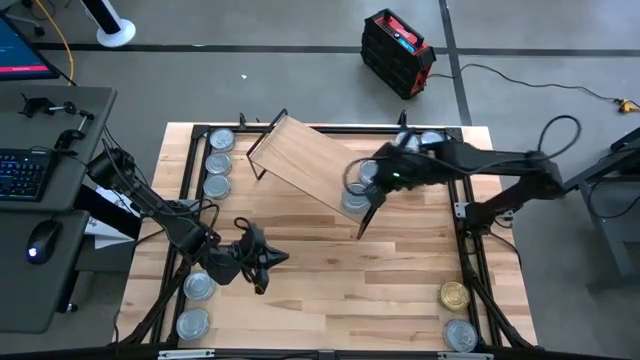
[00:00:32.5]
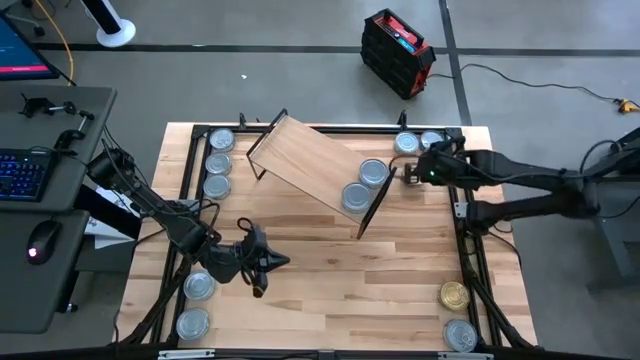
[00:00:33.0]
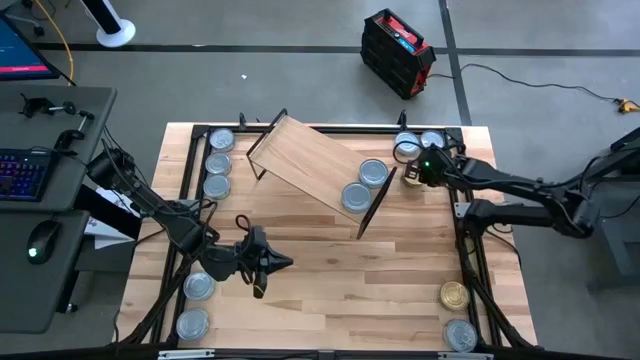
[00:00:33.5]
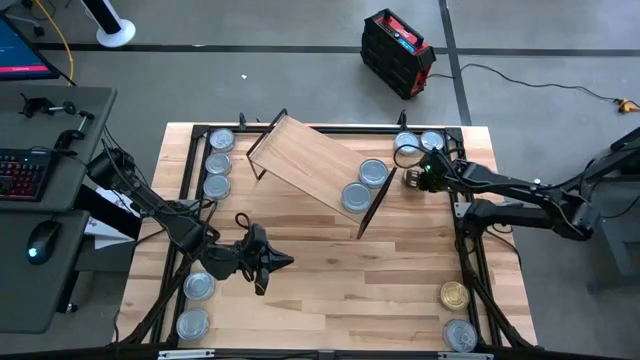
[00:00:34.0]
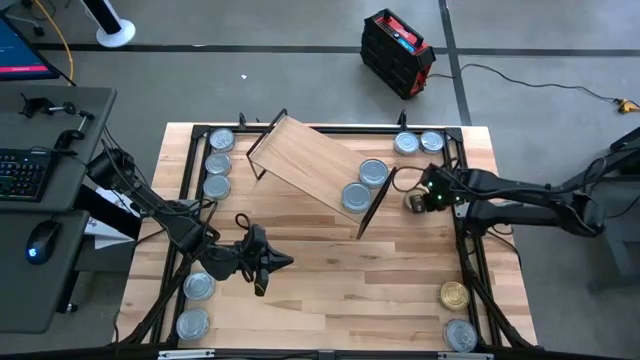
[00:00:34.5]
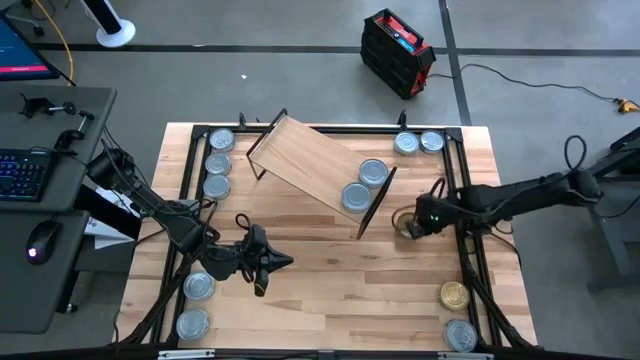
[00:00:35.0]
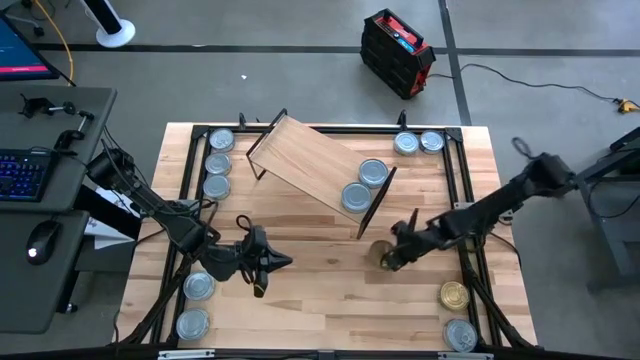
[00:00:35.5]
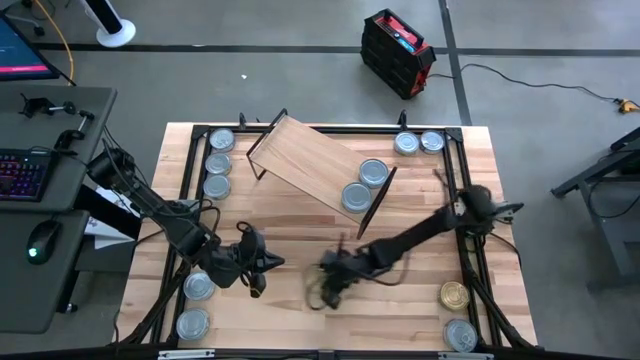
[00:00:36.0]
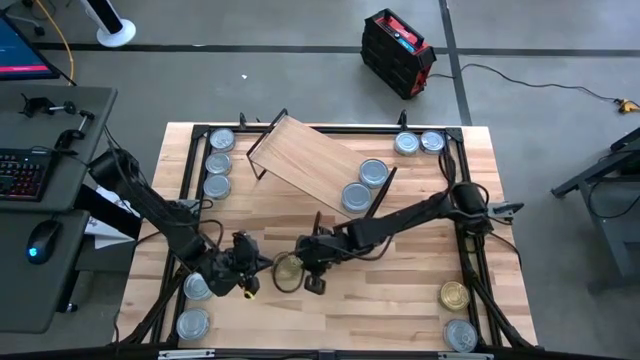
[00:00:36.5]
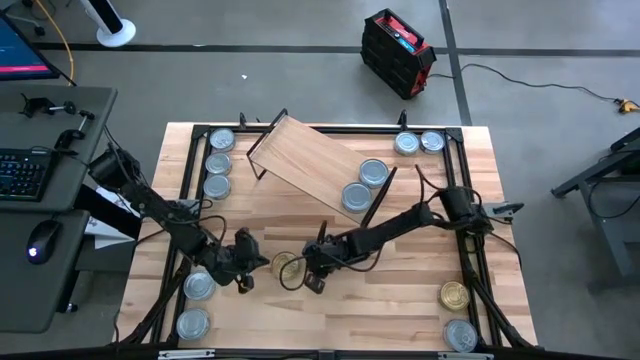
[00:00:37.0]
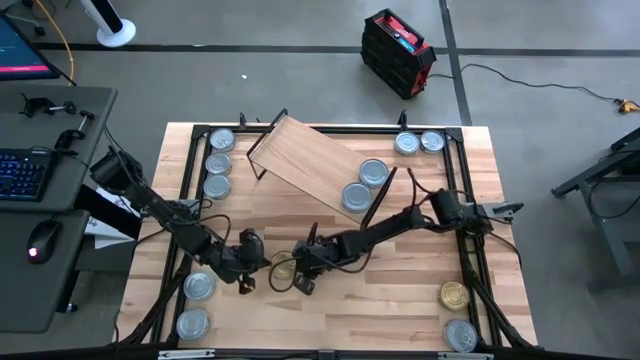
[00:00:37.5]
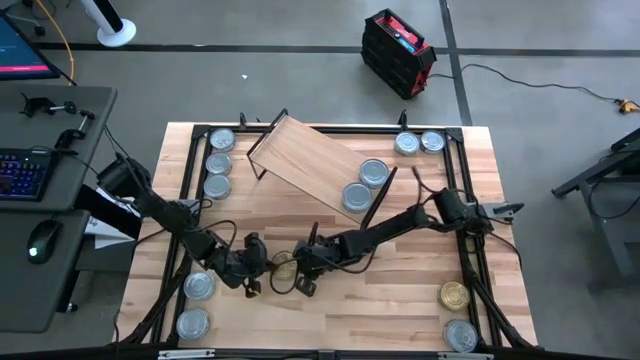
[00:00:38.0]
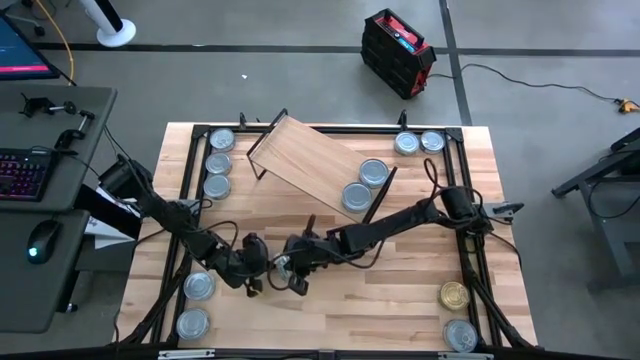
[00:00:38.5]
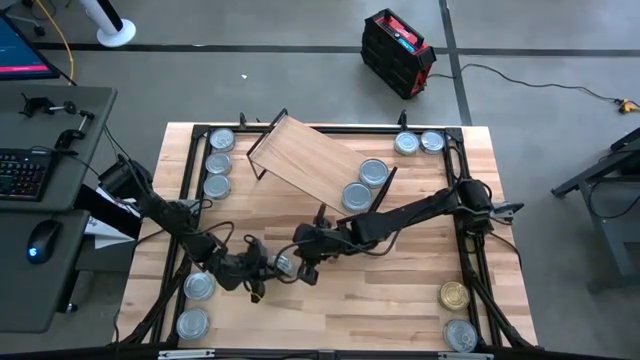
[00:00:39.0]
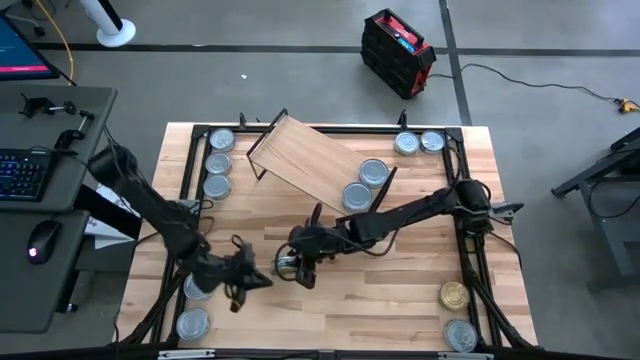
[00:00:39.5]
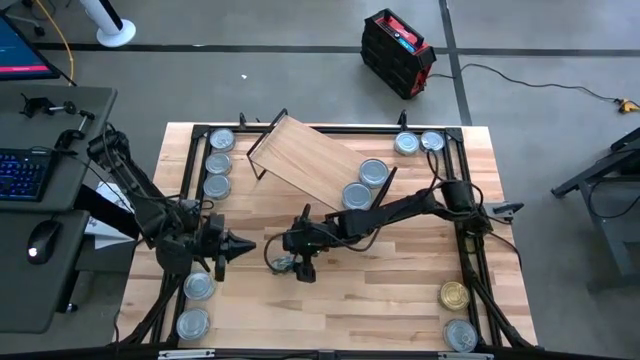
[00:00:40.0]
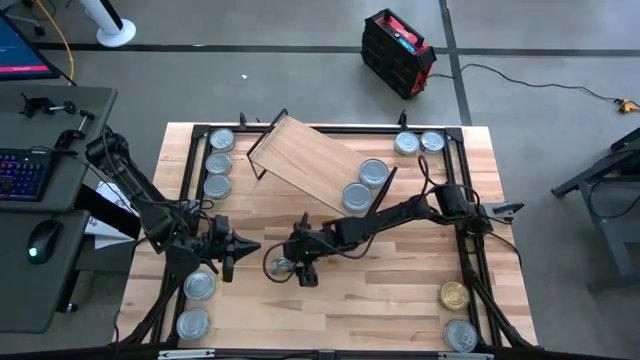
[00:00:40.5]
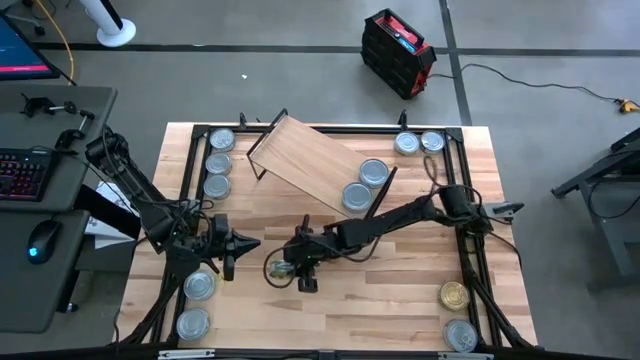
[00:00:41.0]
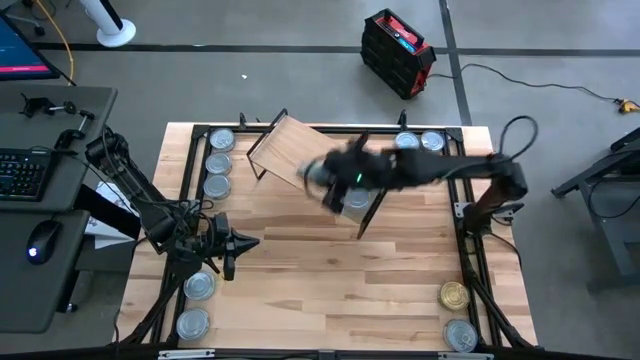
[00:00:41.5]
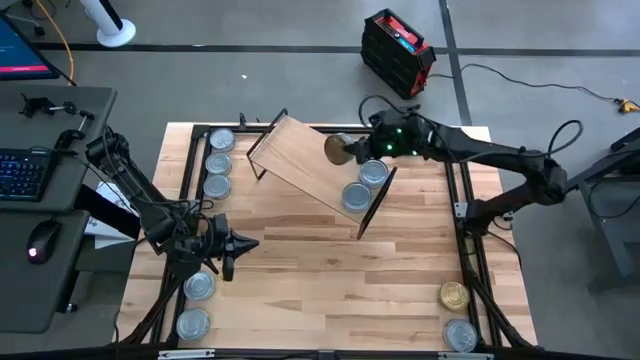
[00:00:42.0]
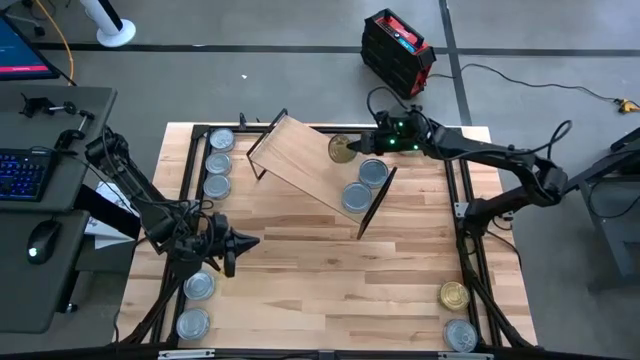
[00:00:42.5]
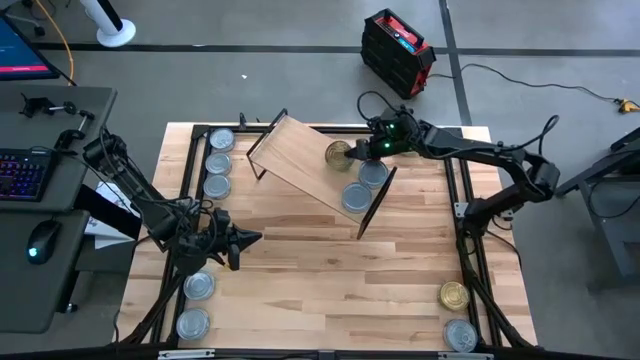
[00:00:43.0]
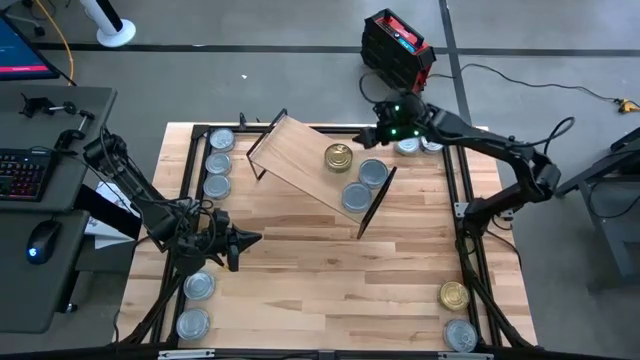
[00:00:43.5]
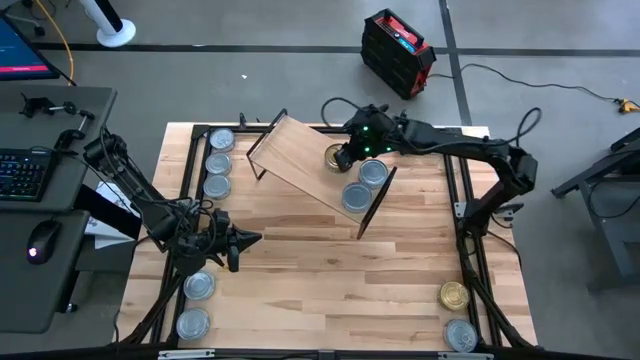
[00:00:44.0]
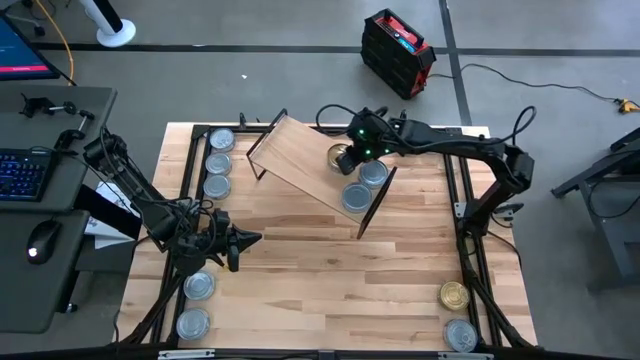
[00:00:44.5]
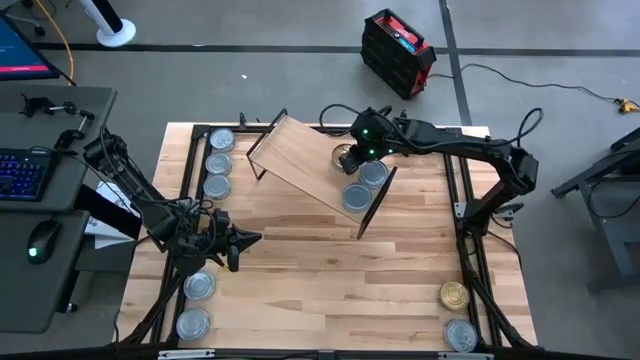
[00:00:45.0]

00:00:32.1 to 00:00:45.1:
Task: Stack canned seafood by type on shelf
Put the green tuna can on the shelf

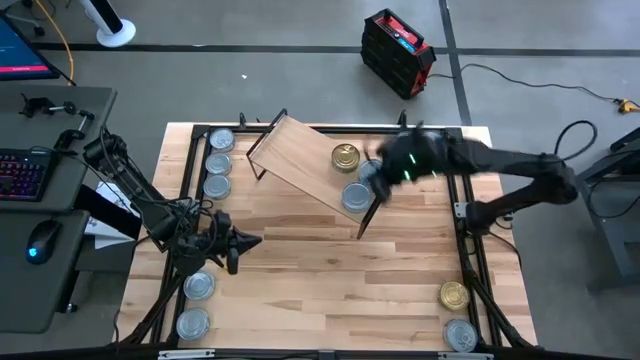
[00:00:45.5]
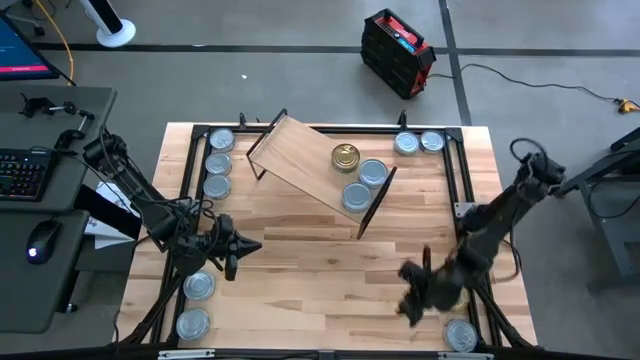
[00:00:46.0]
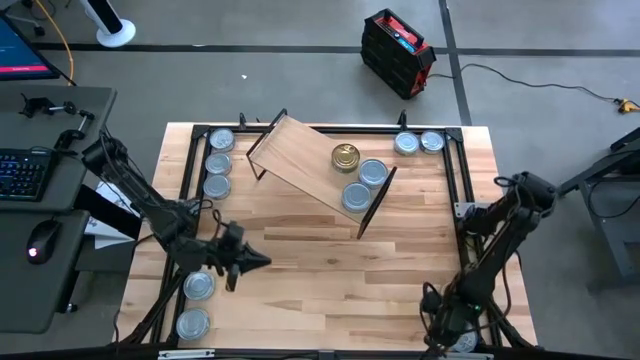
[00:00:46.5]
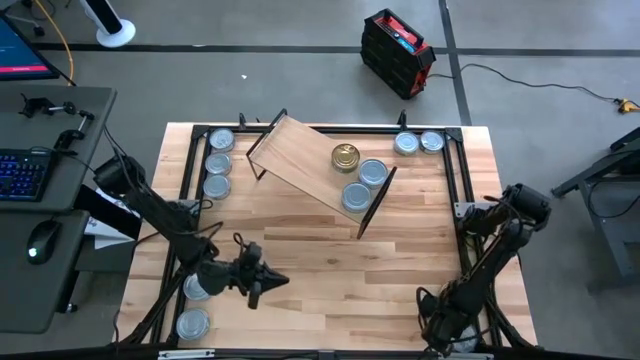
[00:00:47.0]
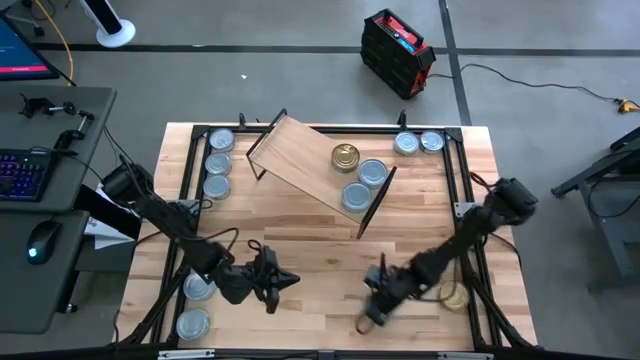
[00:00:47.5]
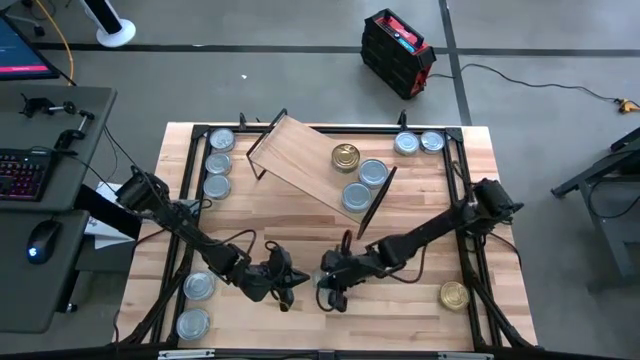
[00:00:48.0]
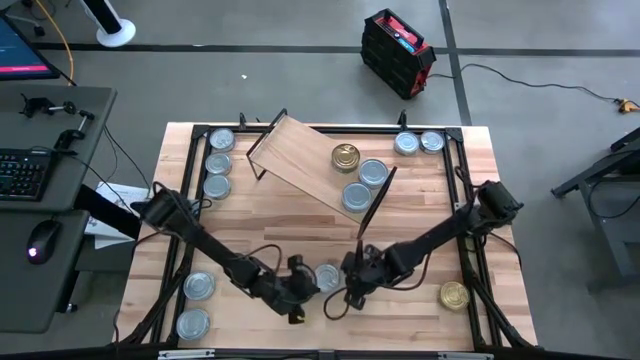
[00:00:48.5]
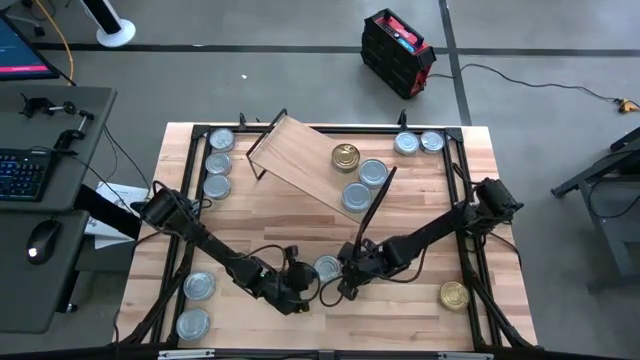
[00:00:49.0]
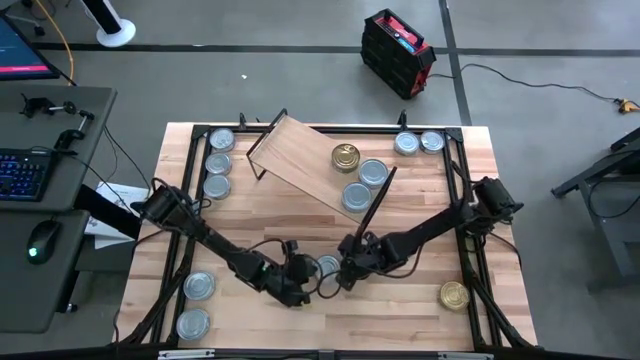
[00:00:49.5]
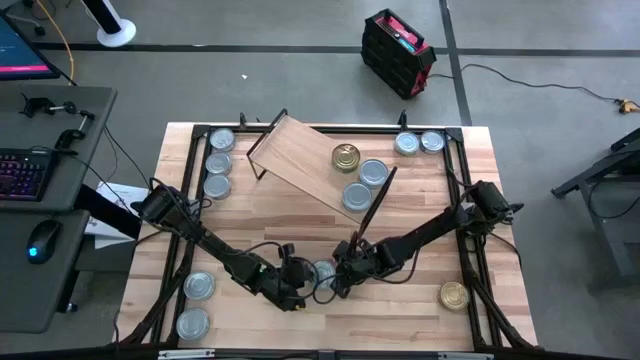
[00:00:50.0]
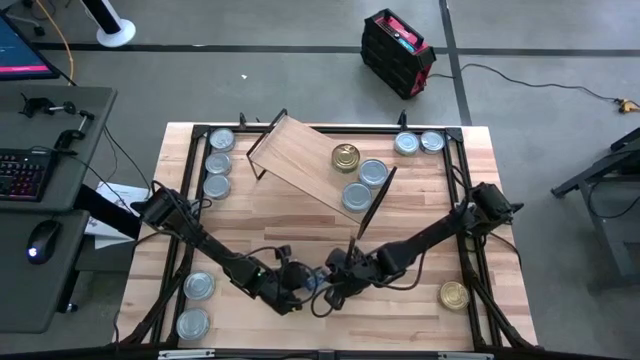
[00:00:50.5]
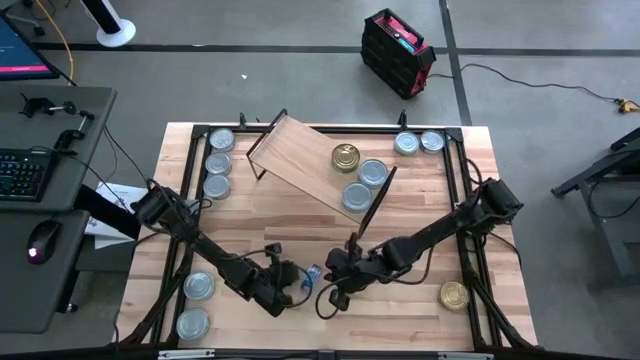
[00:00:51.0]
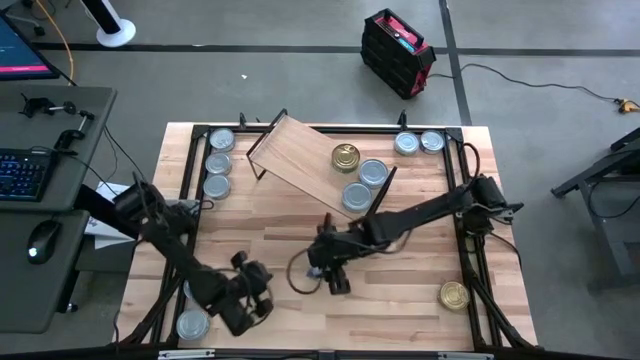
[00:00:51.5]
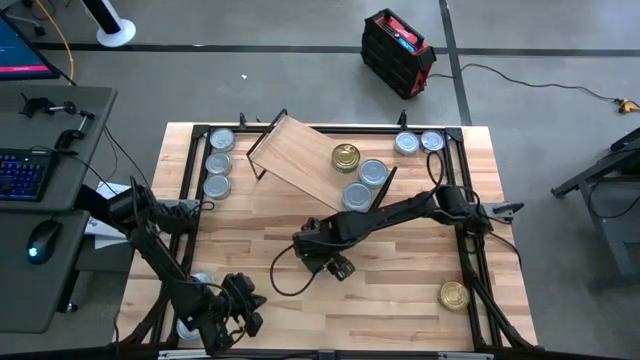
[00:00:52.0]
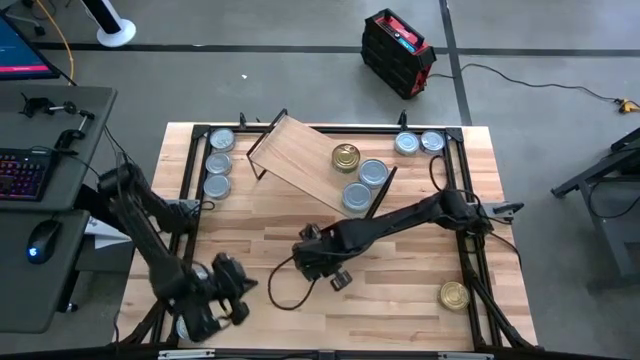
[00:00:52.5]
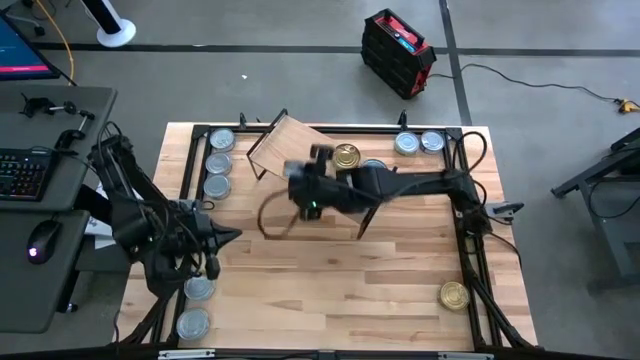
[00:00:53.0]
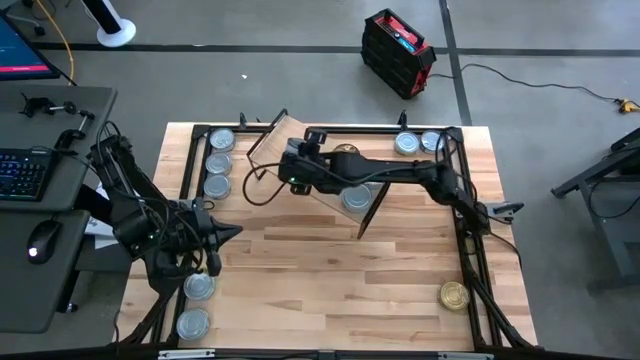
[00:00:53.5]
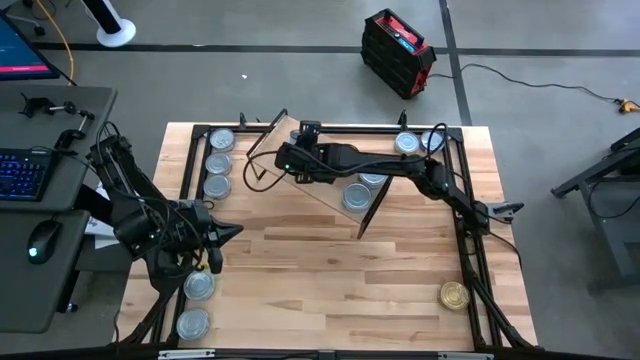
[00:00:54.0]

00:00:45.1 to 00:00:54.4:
Put the blue tuna can on the shelf
